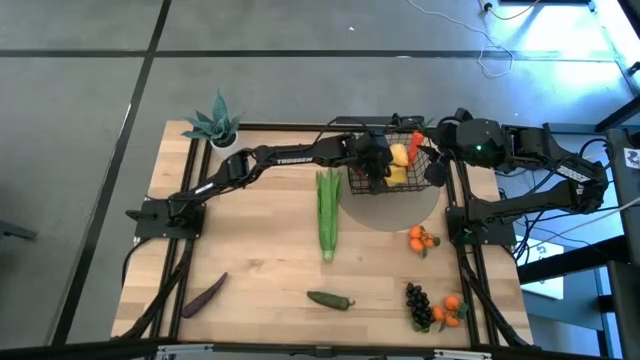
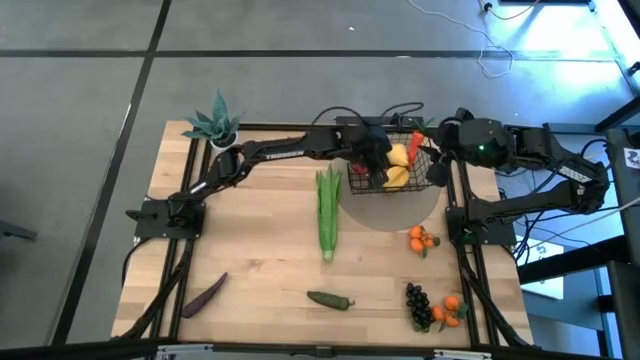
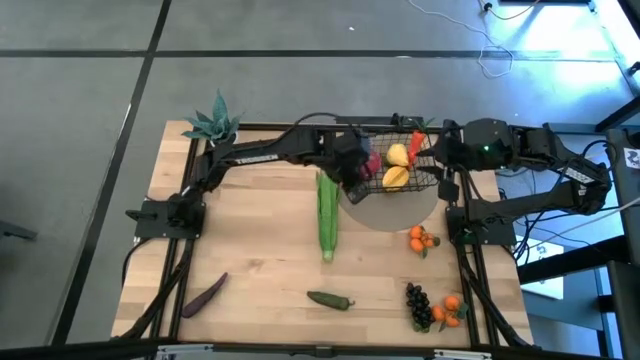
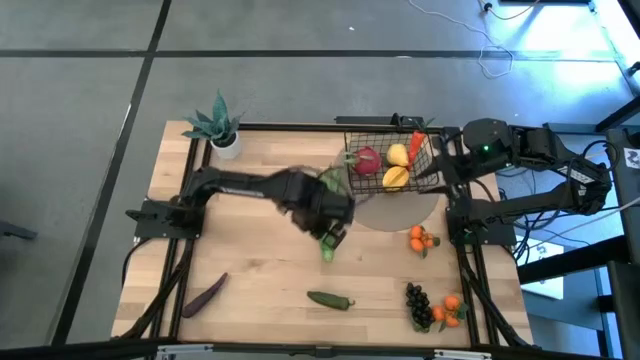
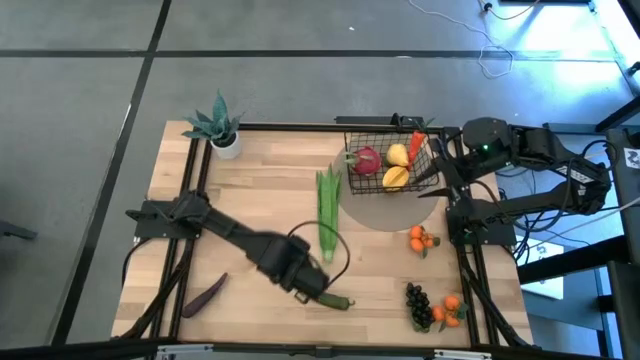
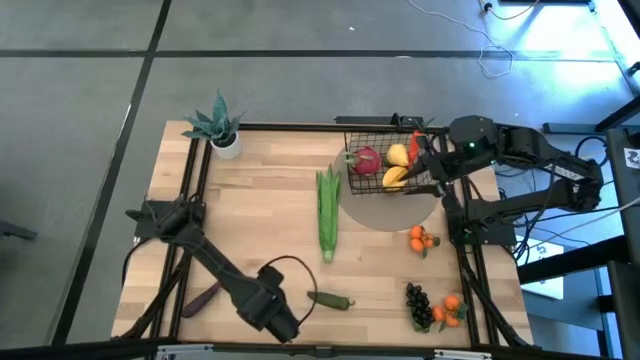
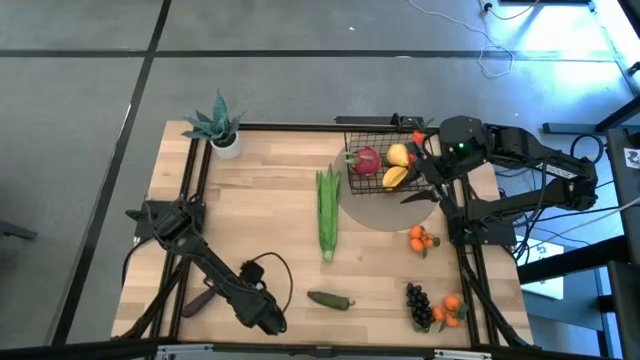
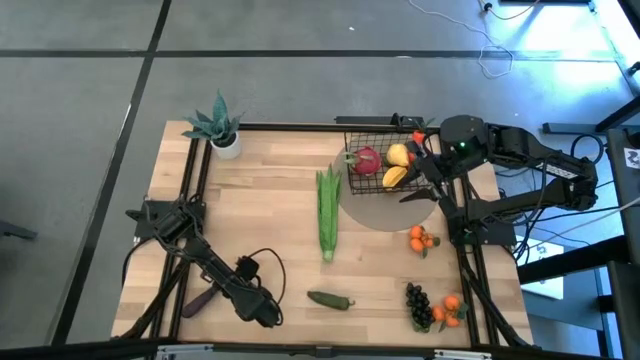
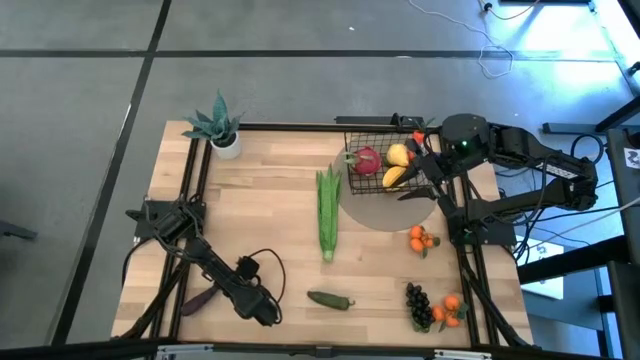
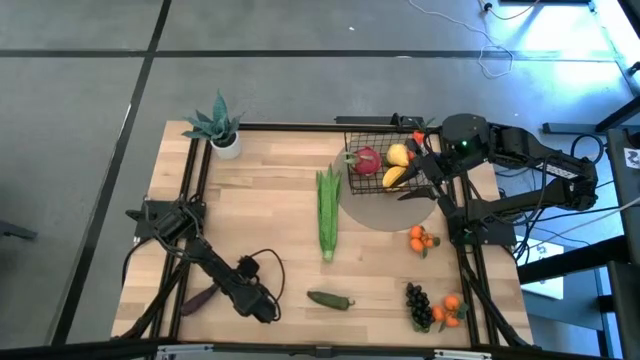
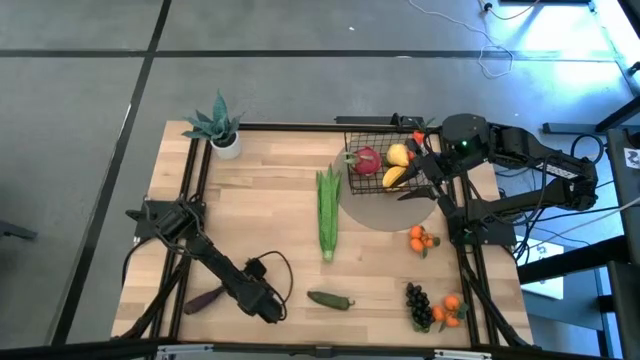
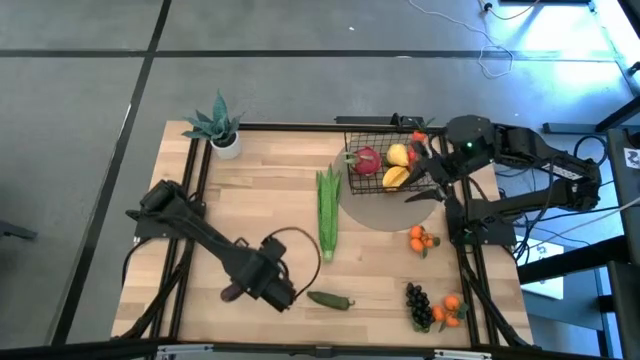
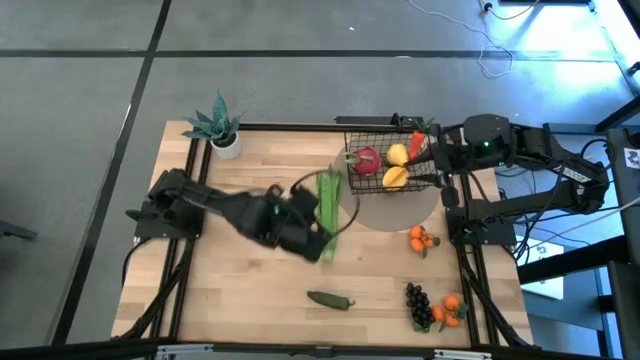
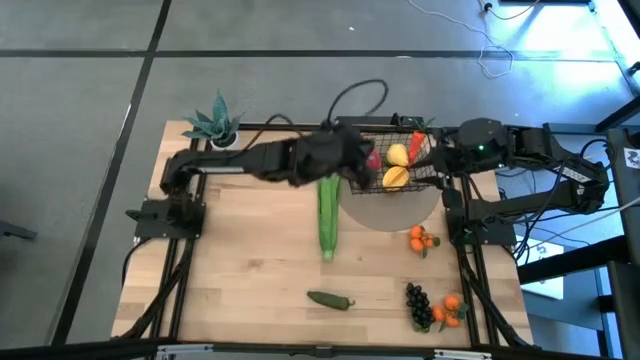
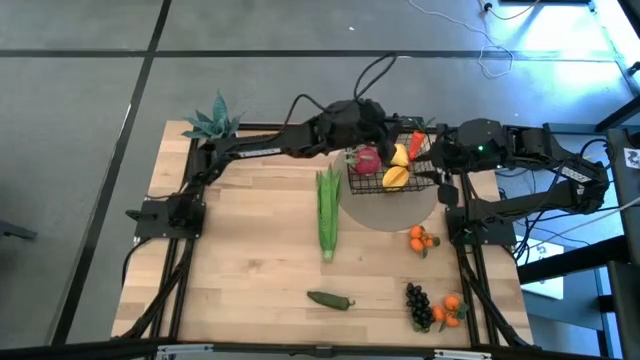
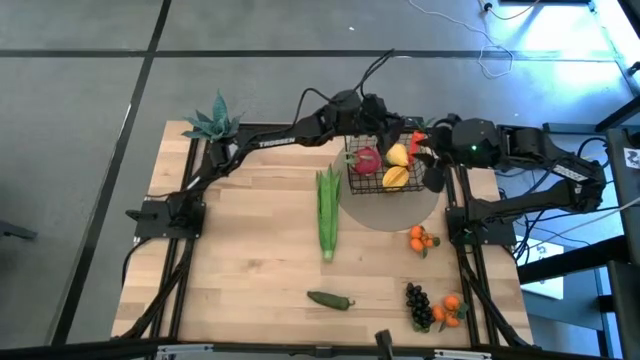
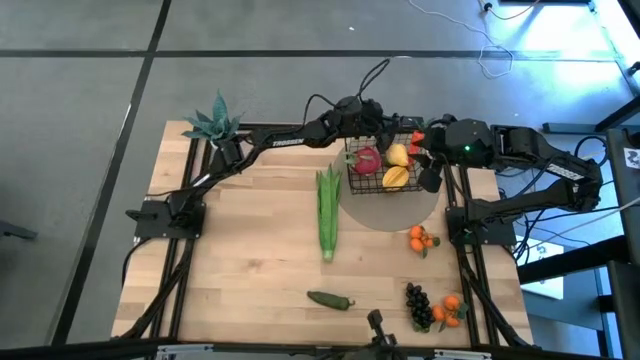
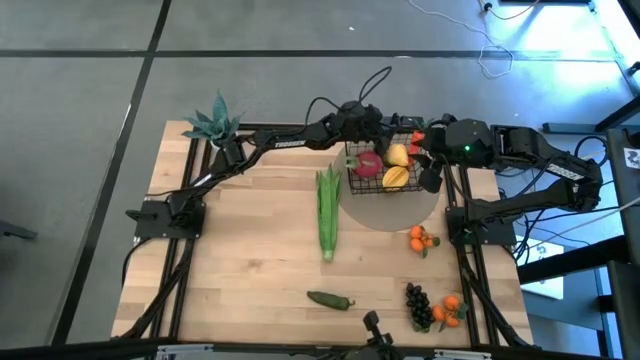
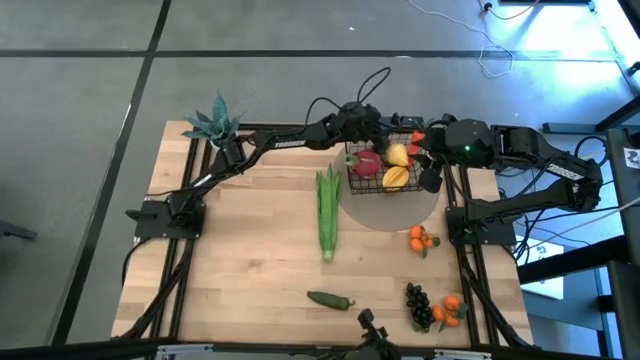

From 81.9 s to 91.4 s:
Task: Build produce basket
Put the eggplant into the black wire basket

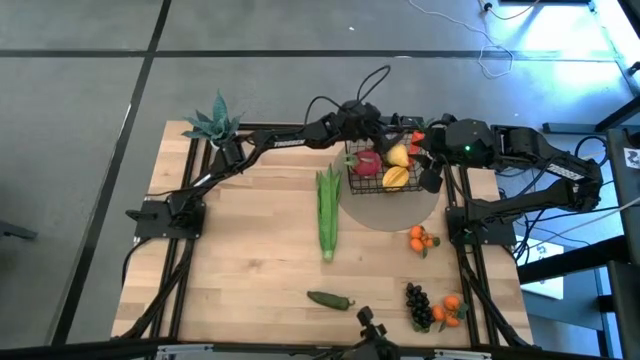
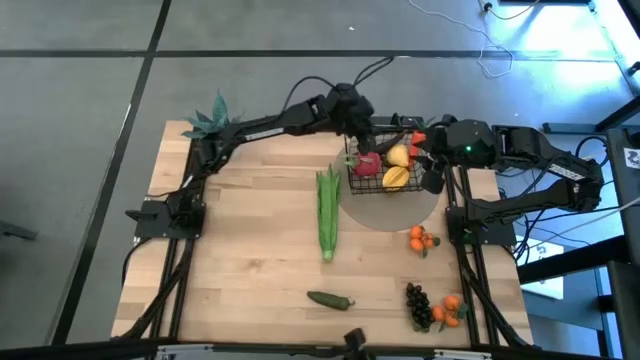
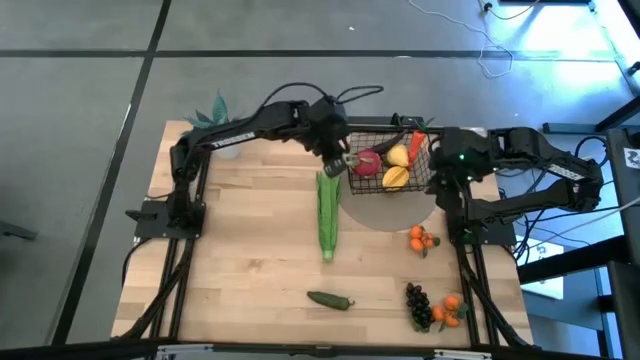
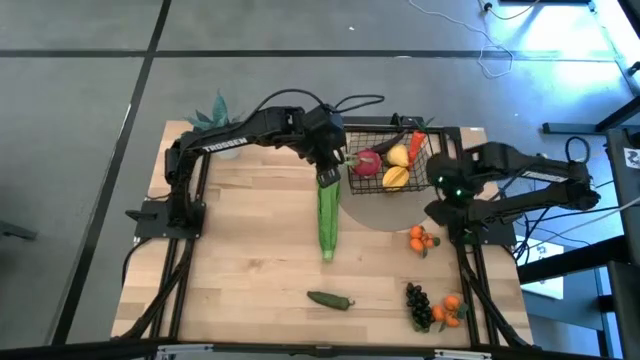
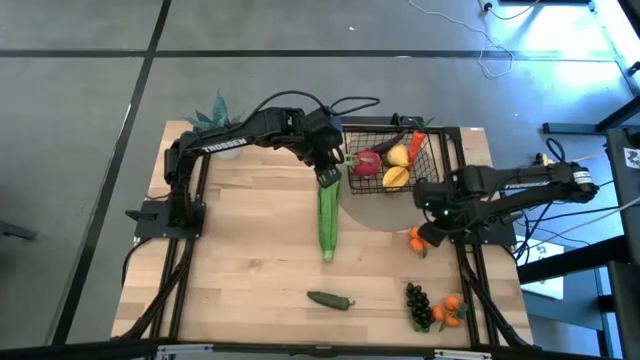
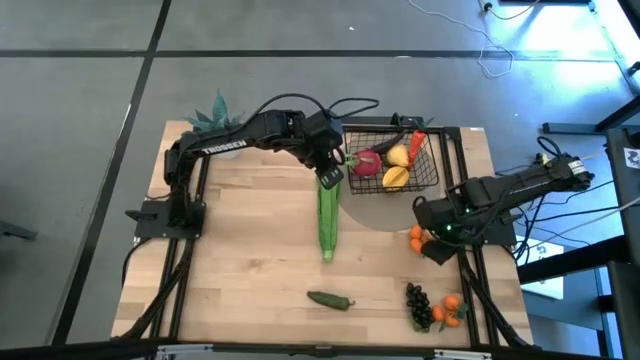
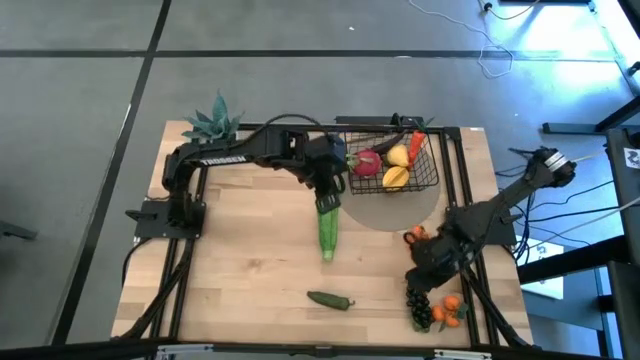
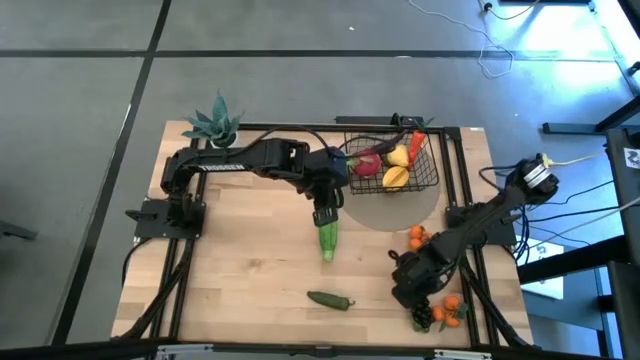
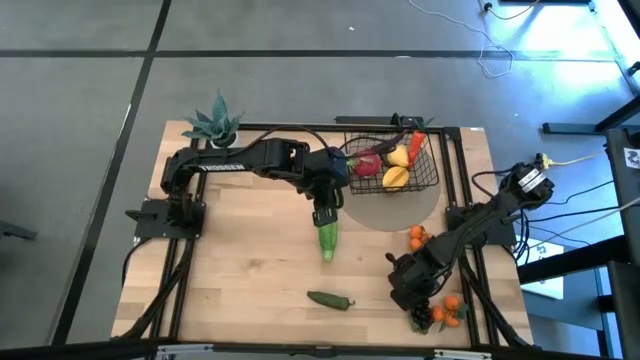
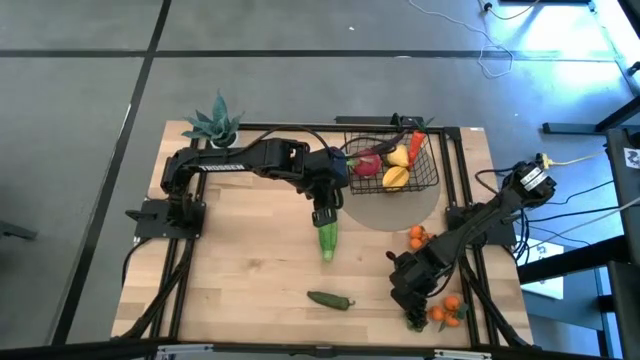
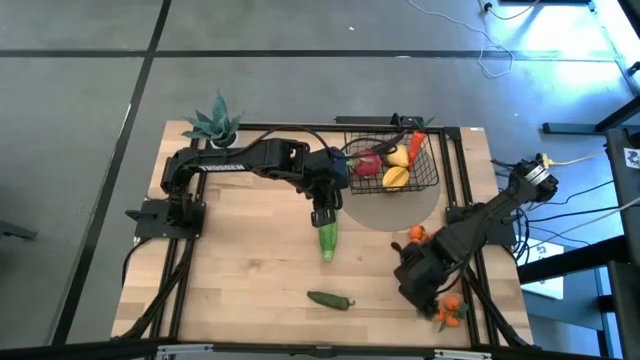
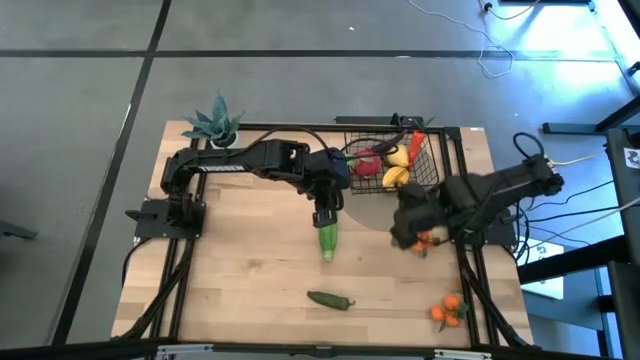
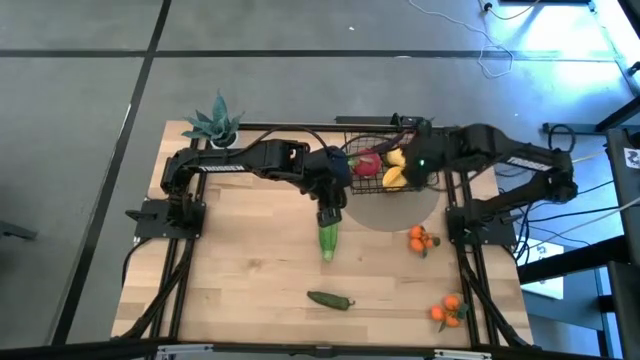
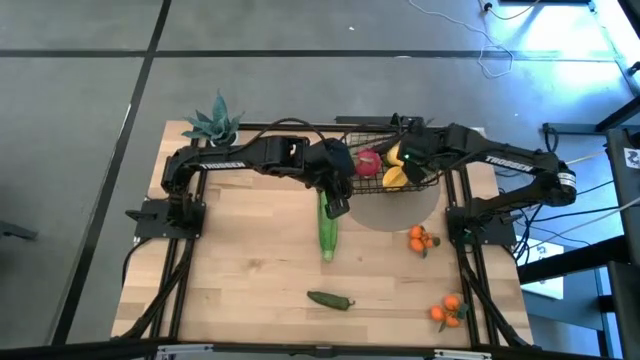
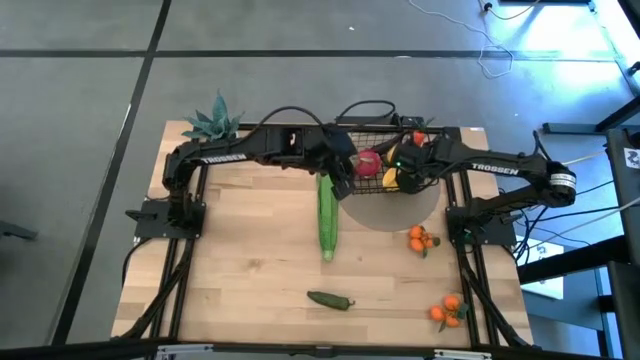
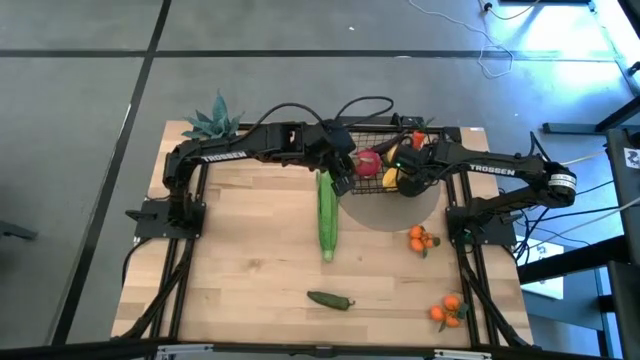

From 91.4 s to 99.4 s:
Put the grapes into the black wire basket

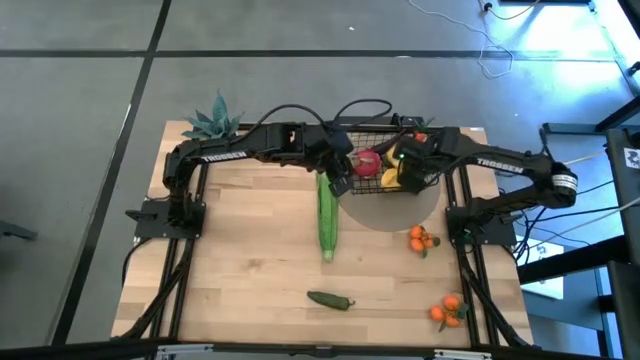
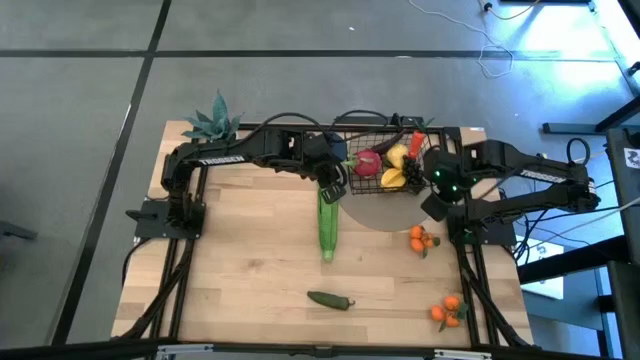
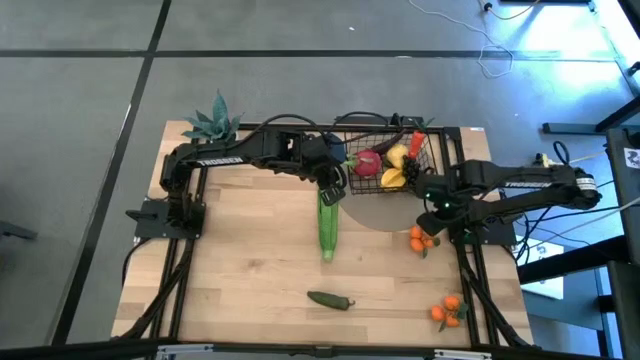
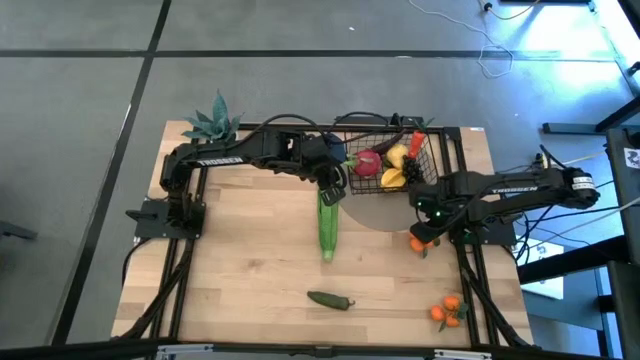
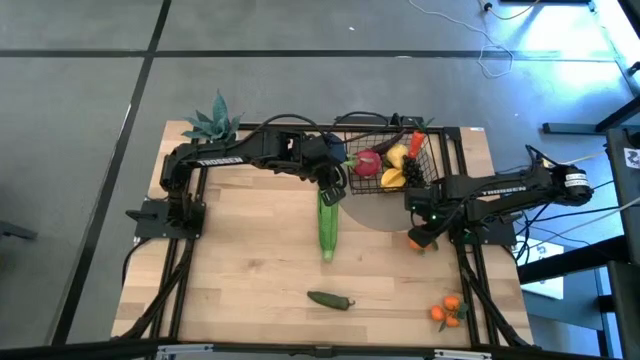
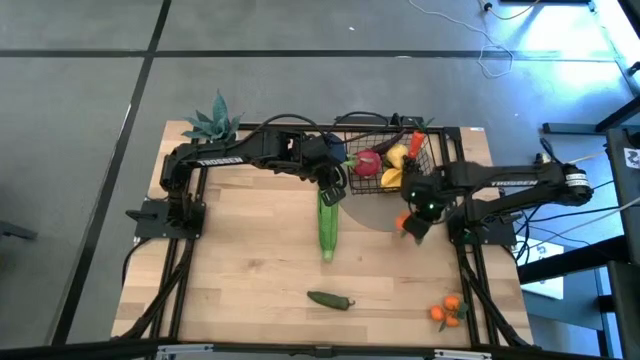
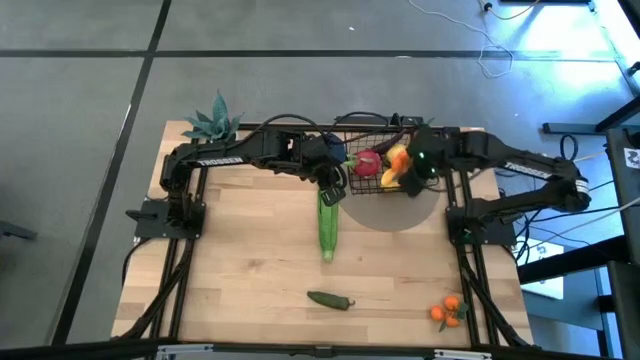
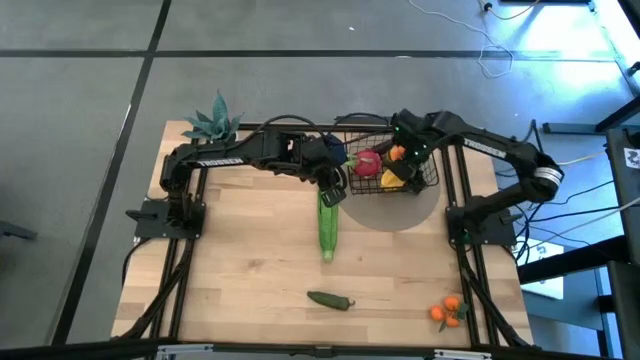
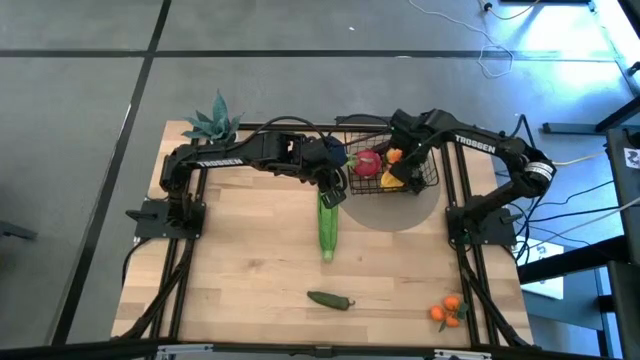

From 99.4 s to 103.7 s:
Put the top tangerines into the black wire basket
